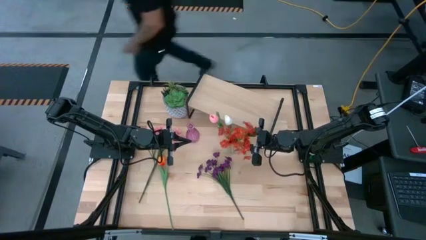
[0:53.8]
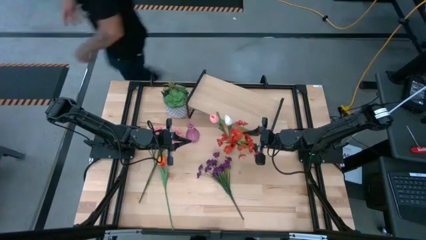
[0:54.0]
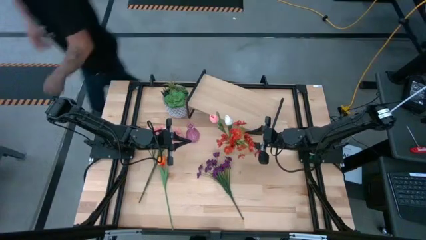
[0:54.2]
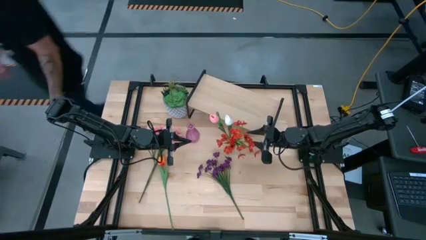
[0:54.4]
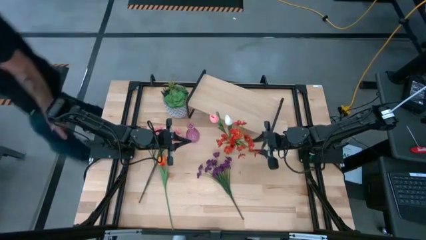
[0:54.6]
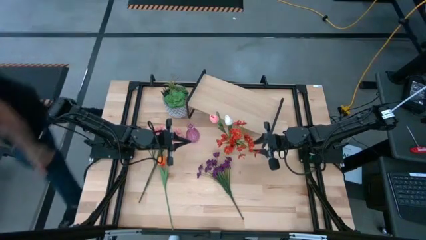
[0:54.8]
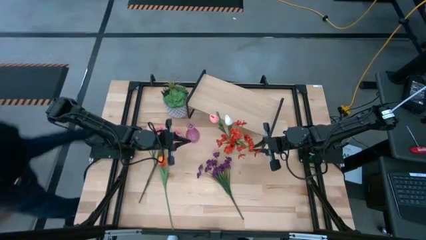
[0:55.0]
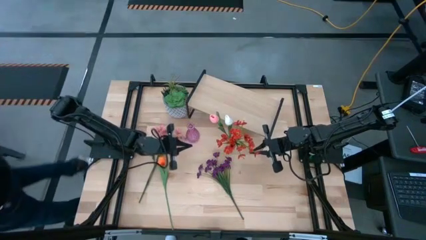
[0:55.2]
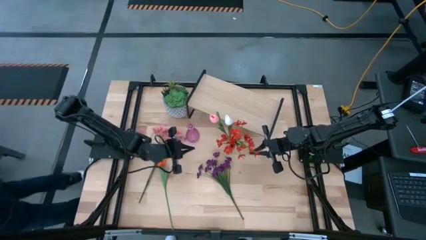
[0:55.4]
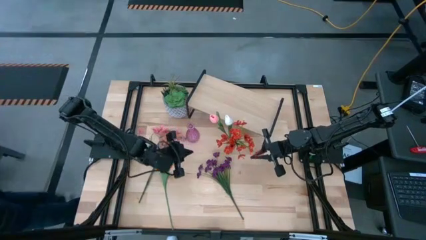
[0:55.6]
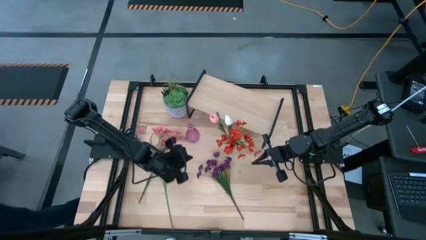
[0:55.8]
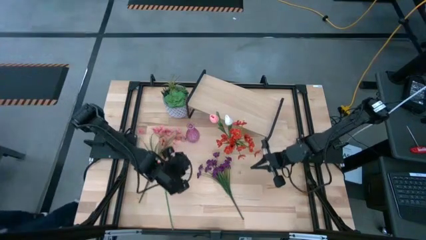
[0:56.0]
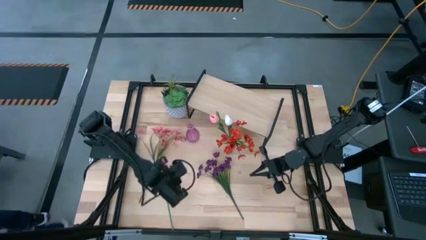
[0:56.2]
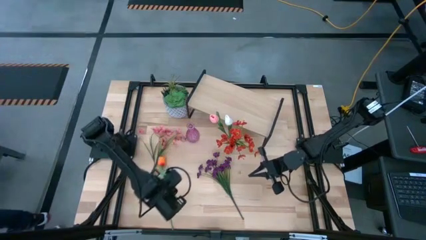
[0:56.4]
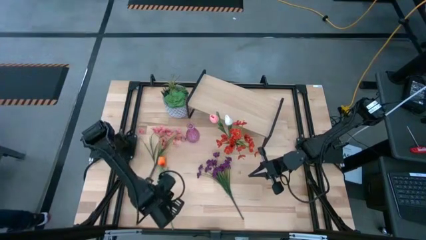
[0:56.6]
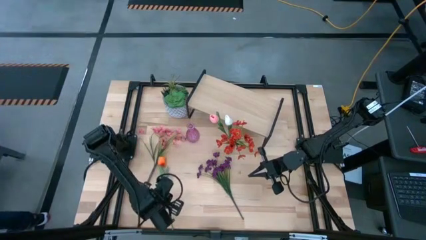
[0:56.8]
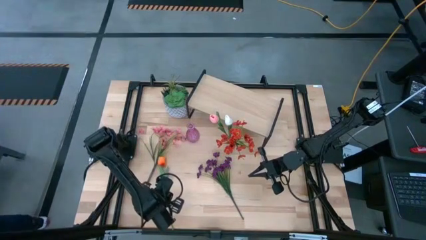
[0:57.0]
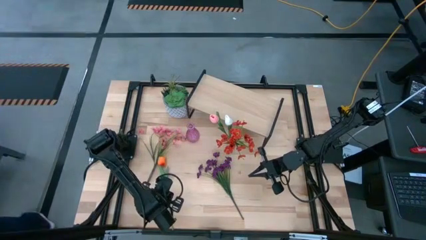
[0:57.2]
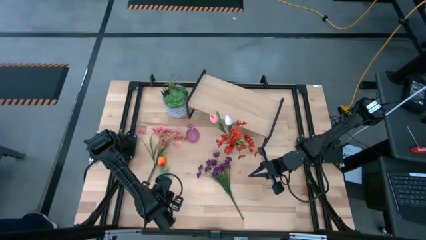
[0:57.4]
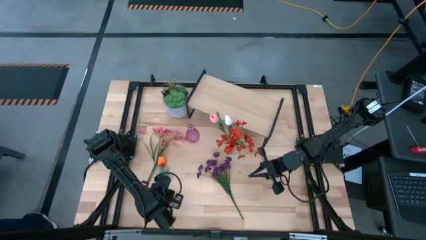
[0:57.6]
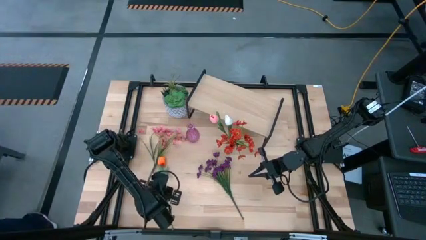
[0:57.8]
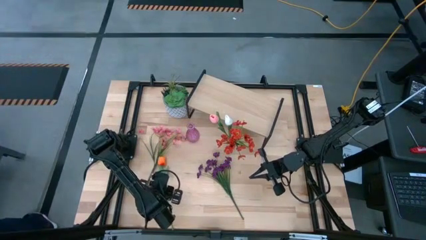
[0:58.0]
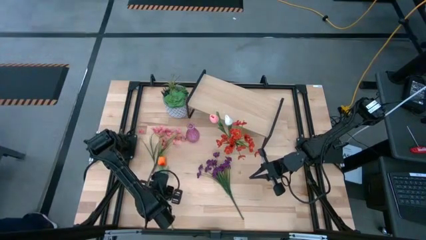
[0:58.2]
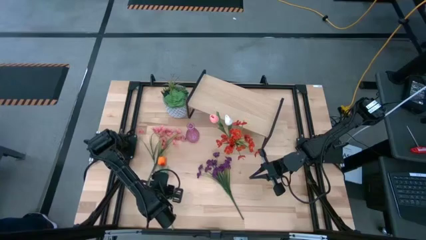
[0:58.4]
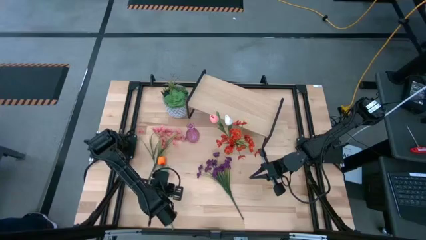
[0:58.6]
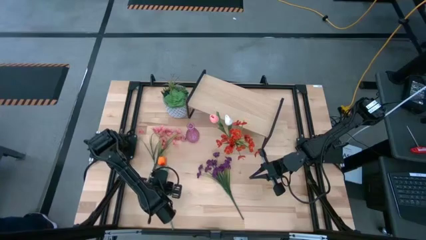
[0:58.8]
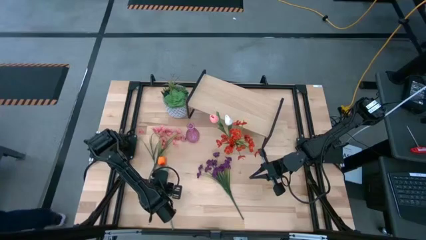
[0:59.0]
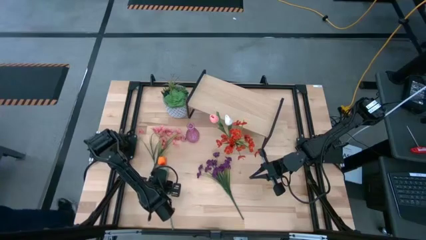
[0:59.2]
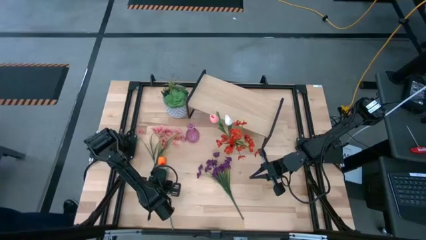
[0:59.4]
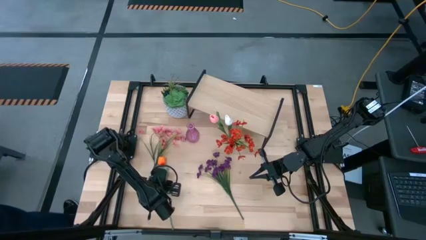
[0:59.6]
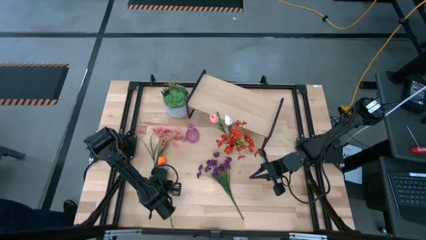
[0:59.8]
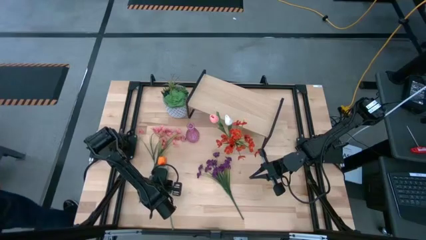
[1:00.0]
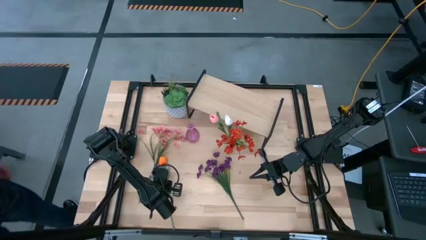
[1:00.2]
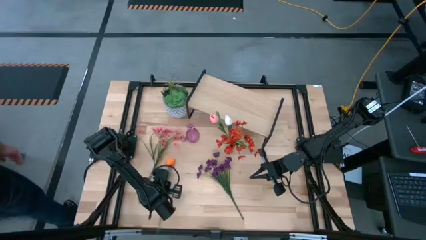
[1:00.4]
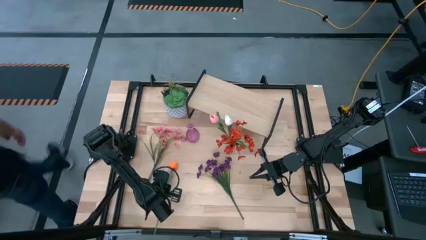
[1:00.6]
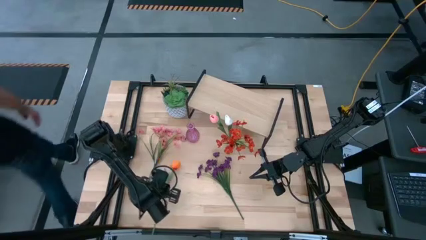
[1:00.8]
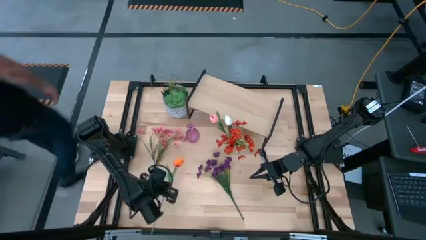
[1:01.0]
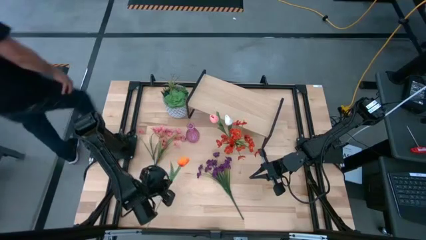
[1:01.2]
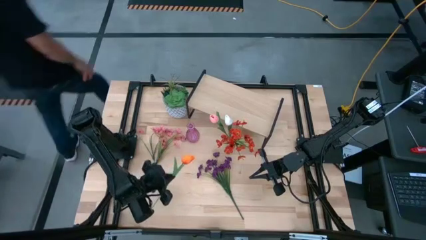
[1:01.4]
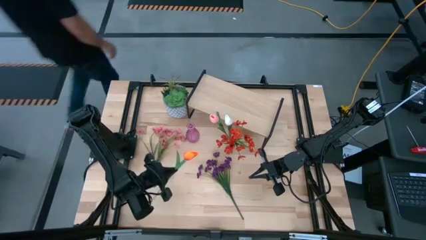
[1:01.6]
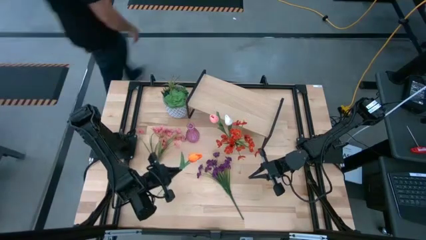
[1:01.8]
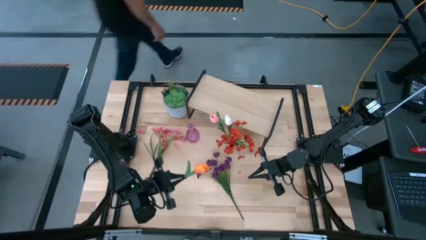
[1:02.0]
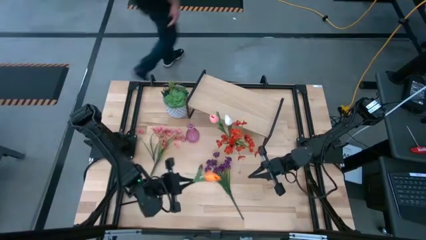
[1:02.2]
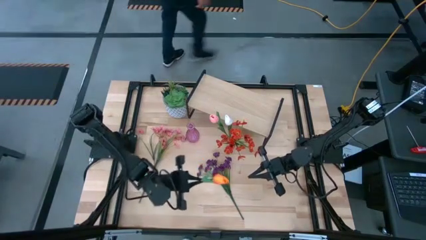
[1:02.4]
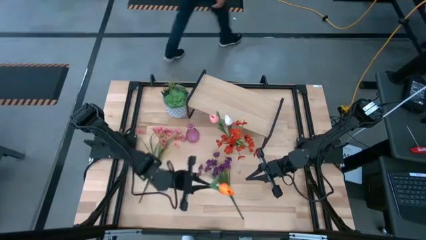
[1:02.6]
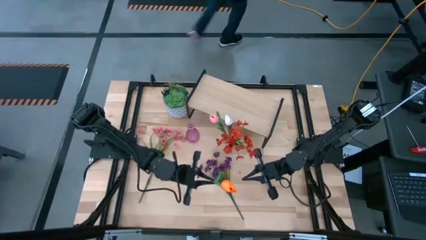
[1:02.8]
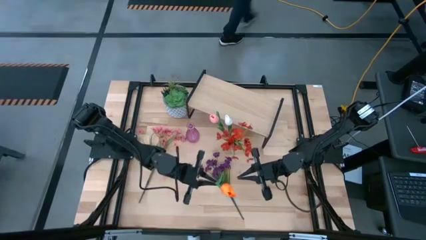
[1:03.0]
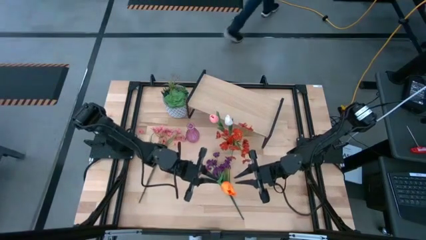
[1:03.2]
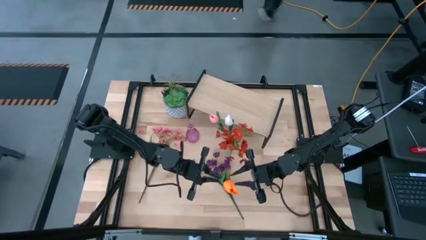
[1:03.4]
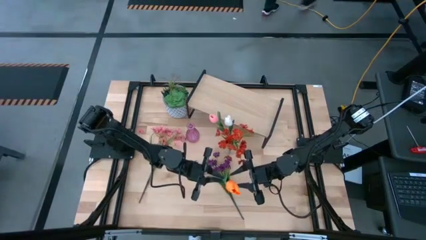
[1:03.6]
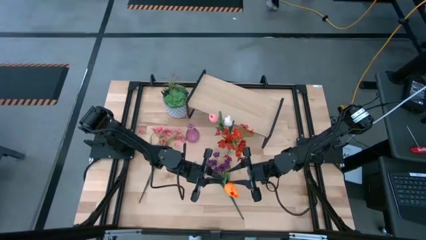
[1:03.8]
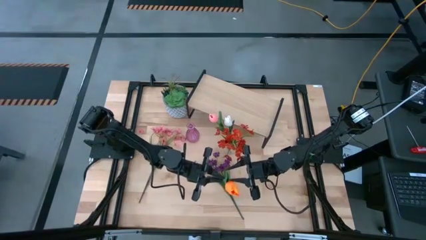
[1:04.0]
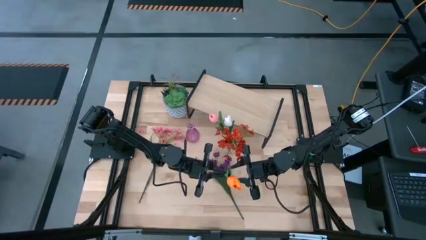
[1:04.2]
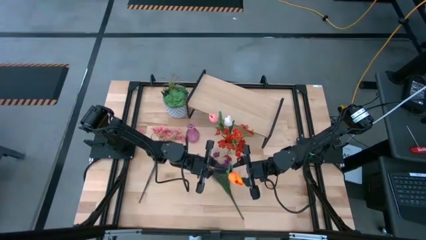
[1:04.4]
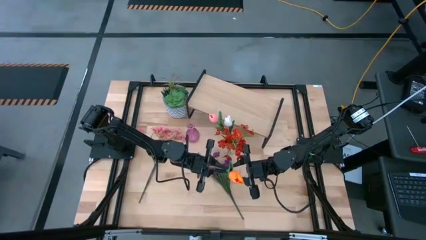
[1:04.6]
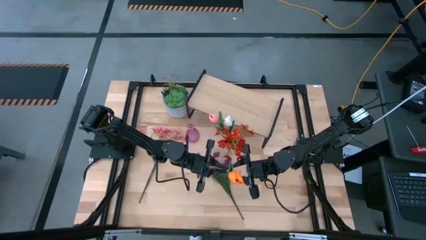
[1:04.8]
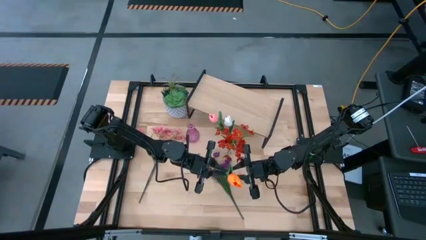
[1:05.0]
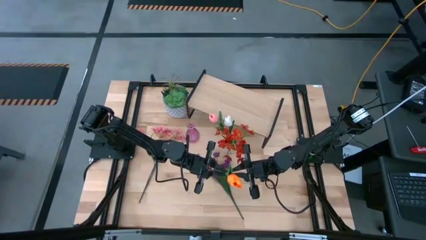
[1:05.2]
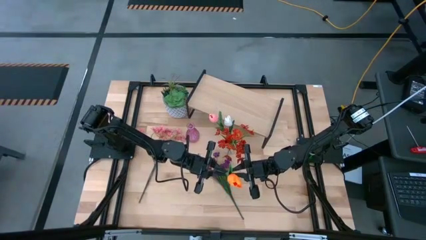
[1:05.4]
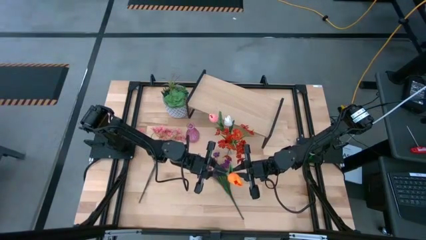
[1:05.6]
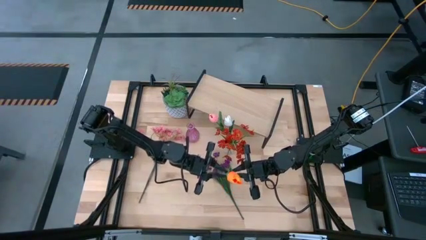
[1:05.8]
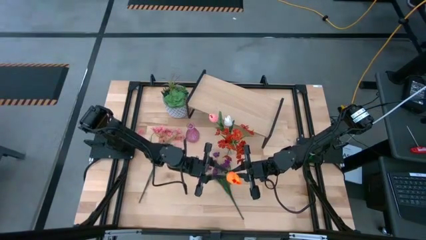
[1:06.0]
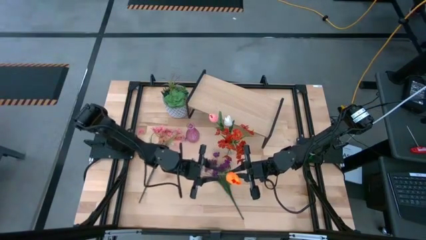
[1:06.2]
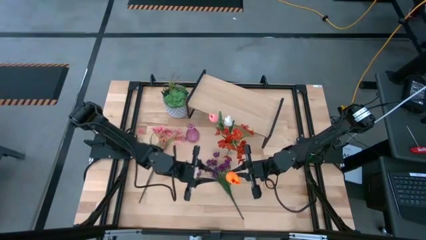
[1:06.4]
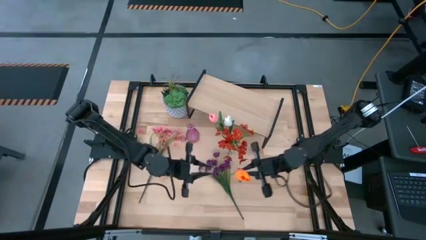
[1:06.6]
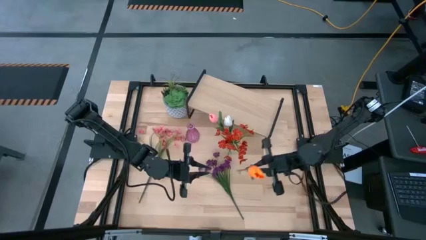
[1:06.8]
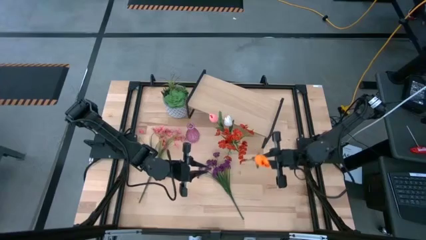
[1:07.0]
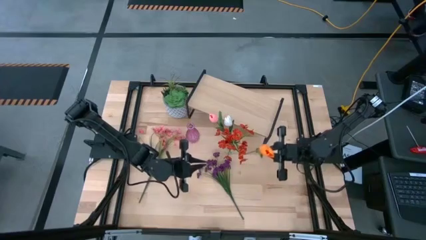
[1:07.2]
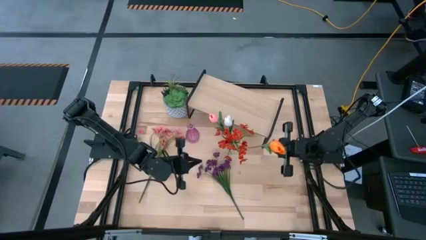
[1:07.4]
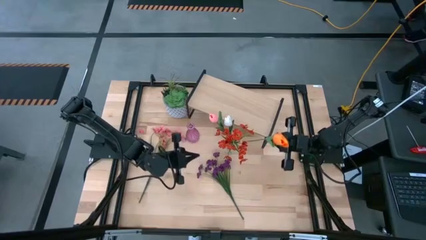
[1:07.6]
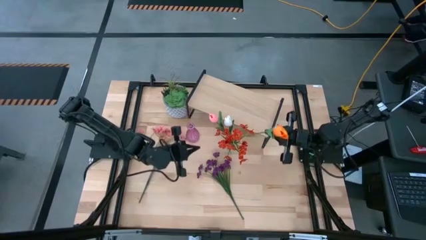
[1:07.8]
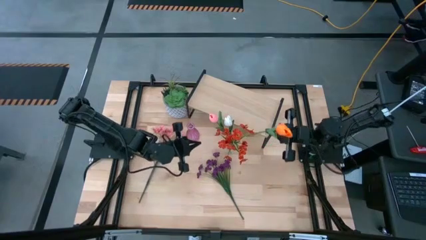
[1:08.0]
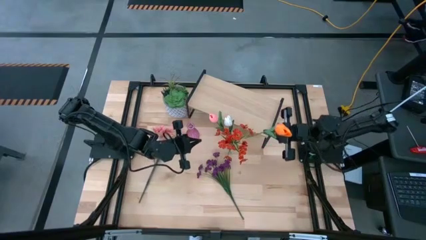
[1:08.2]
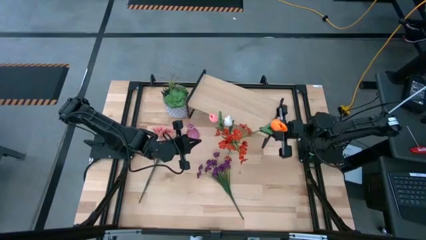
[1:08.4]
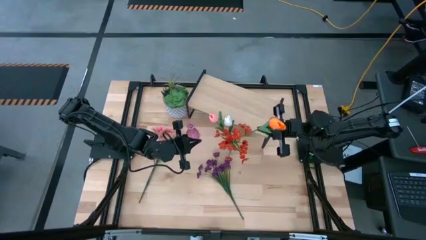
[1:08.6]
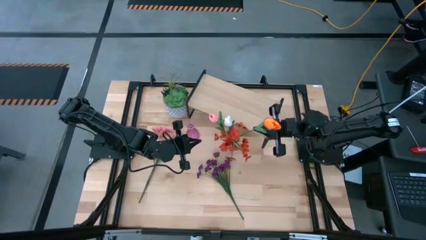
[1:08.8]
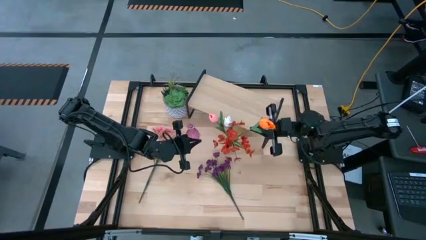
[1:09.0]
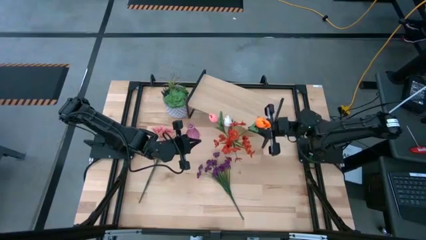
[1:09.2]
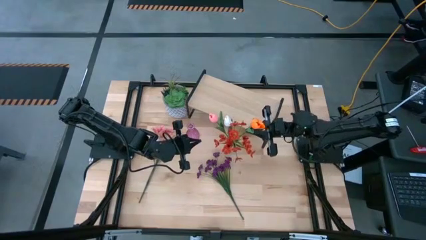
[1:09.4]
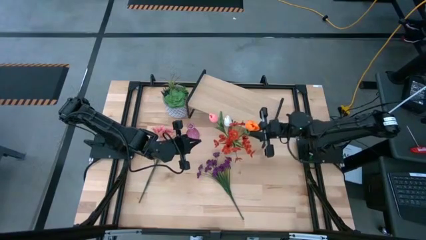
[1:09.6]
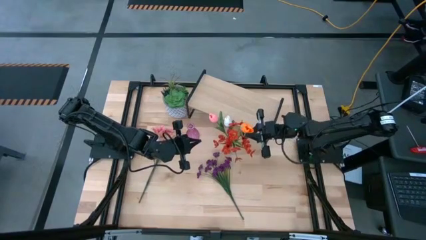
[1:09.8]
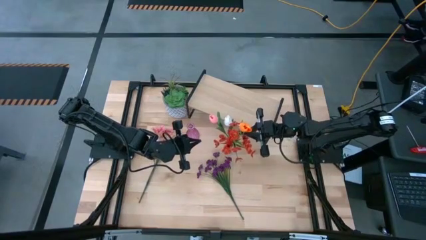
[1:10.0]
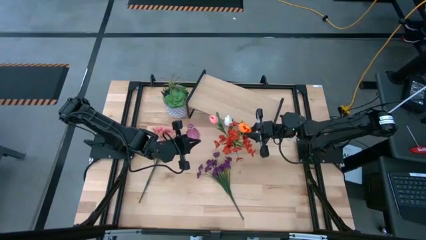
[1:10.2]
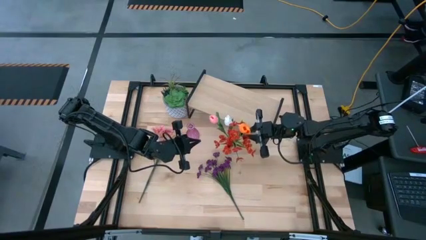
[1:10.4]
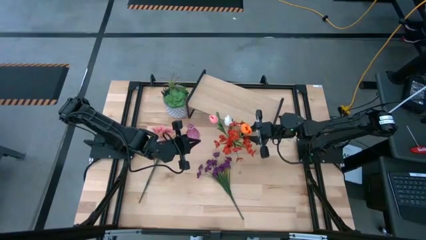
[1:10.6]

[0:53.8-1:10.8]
Task: Pick and place flowers into a vace then onto a shelf
Put the orange flower into the transparent vase
